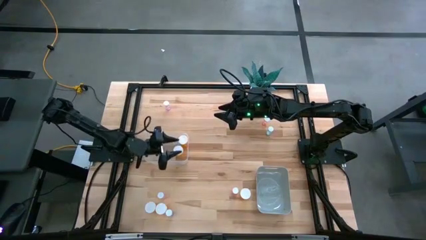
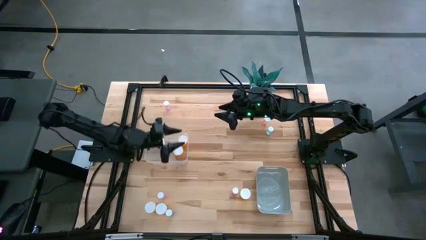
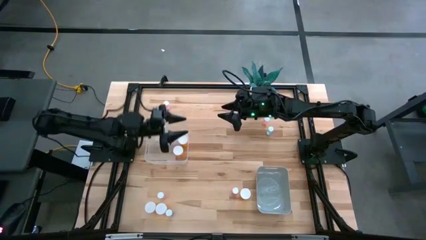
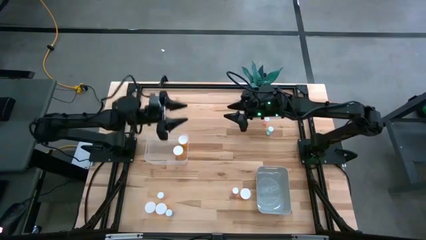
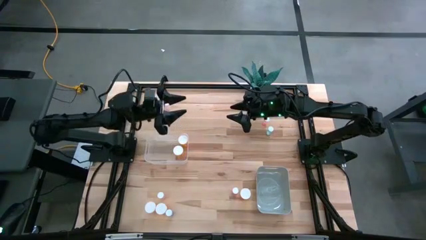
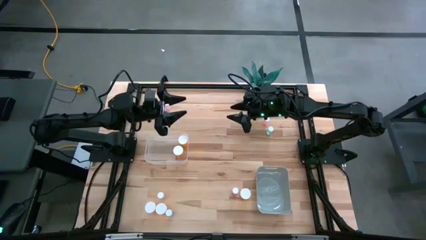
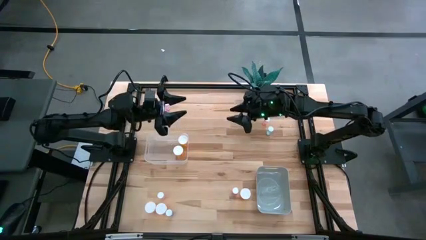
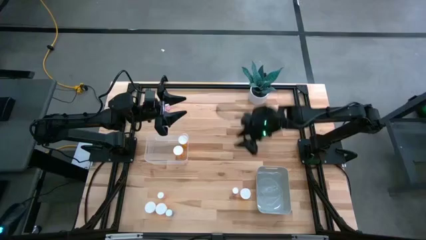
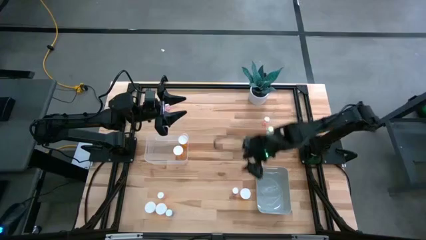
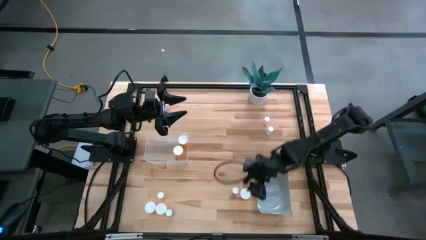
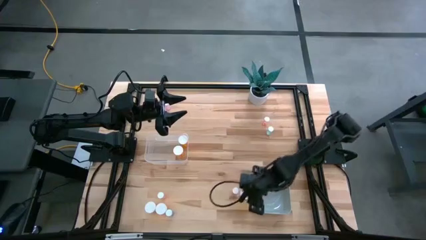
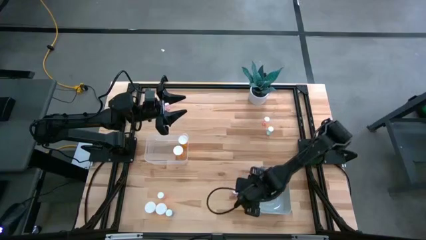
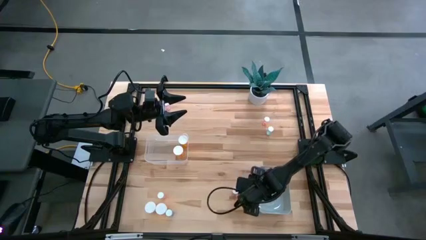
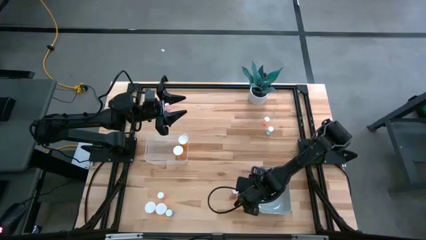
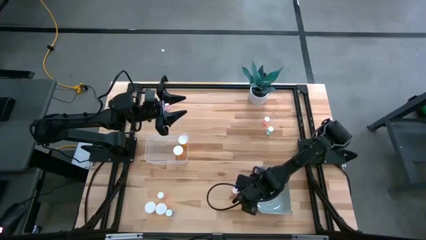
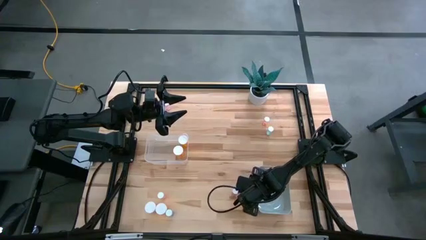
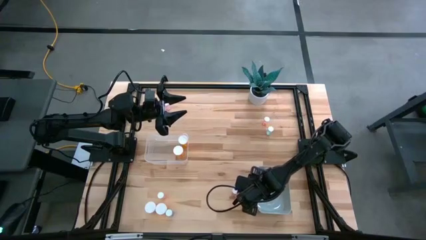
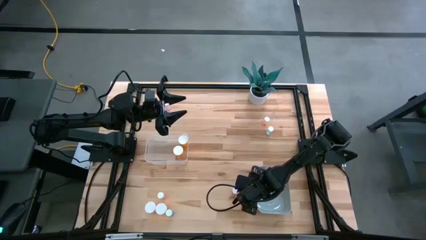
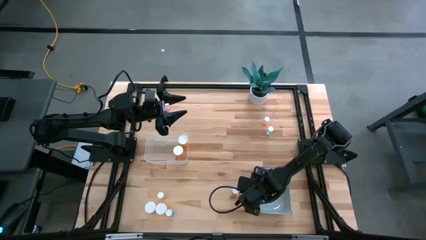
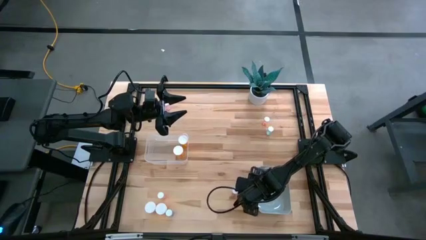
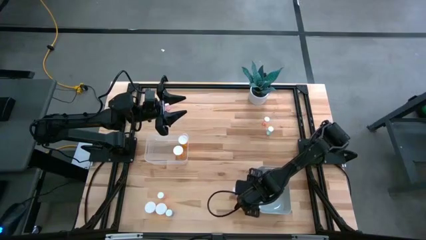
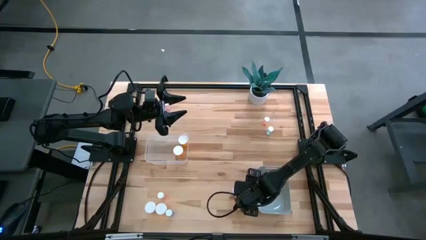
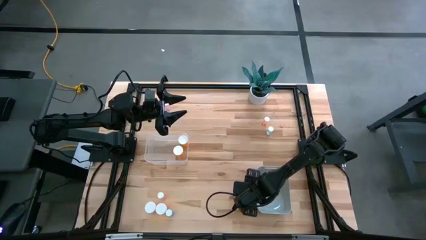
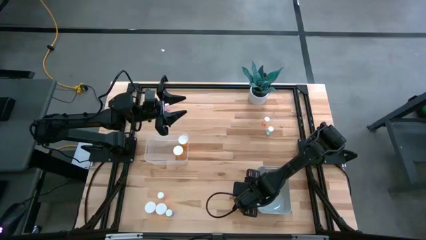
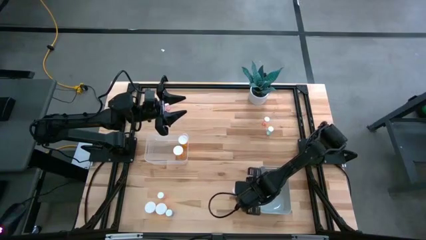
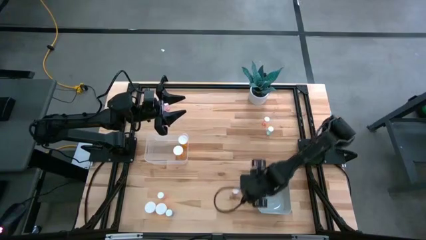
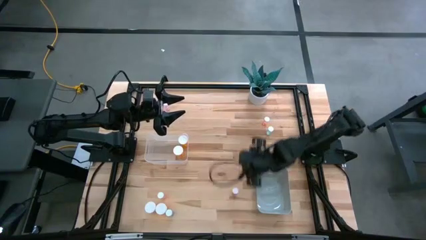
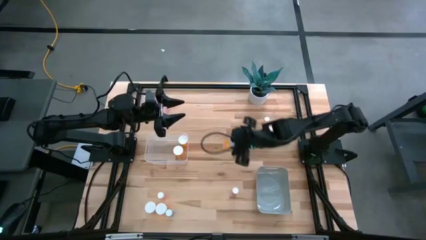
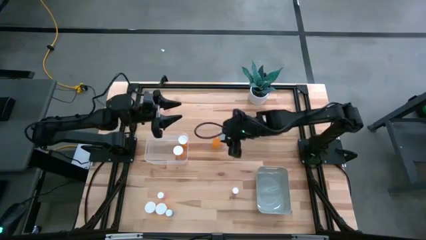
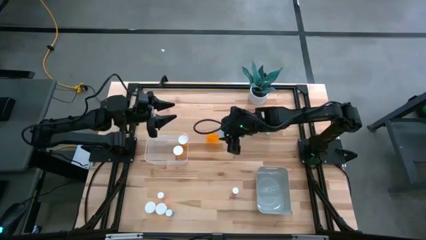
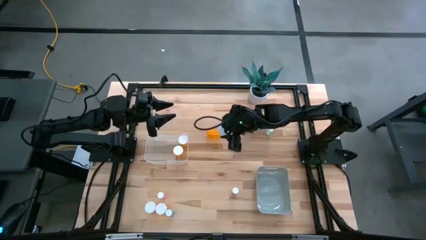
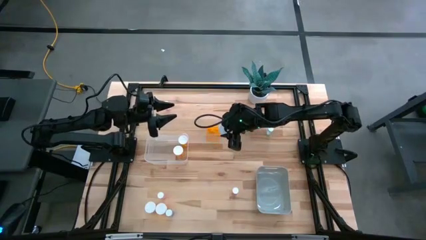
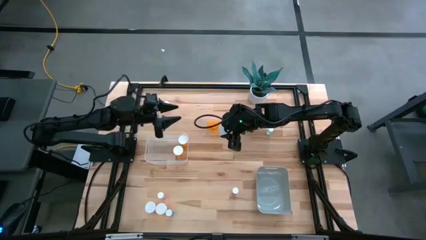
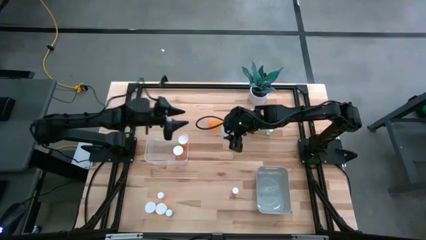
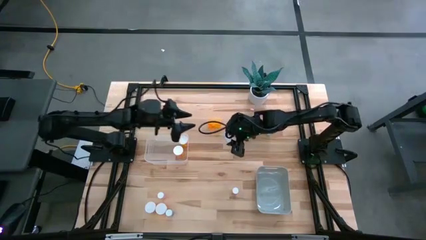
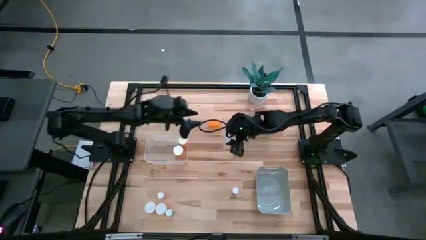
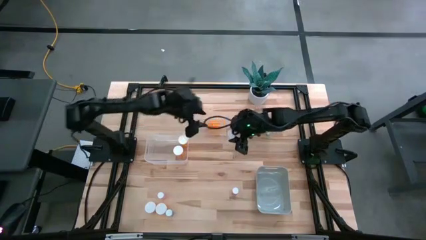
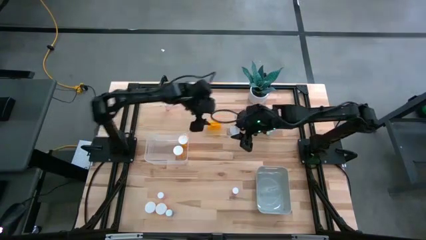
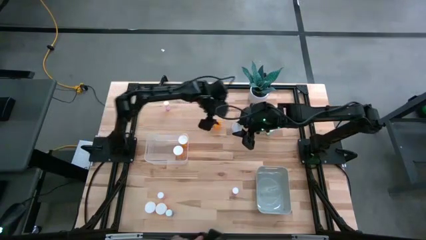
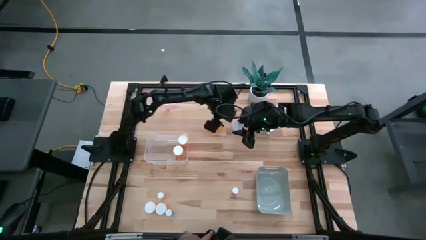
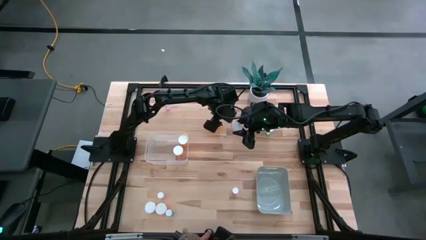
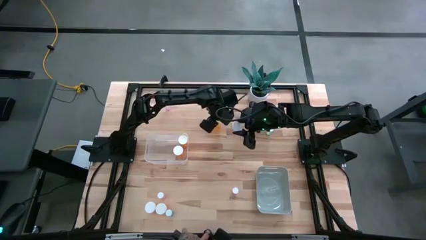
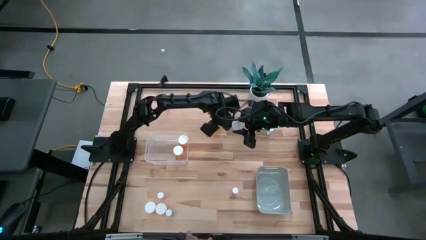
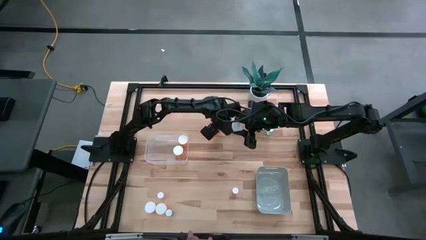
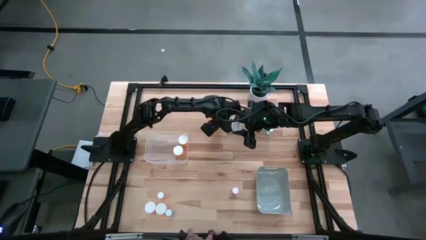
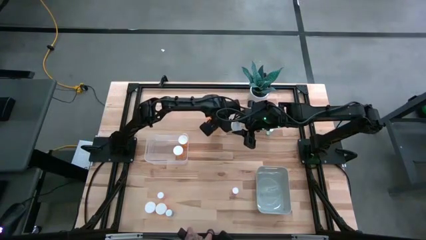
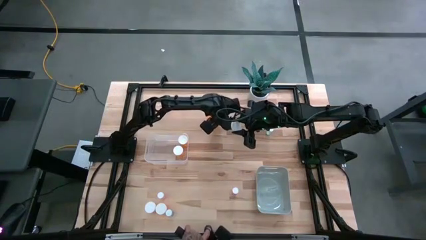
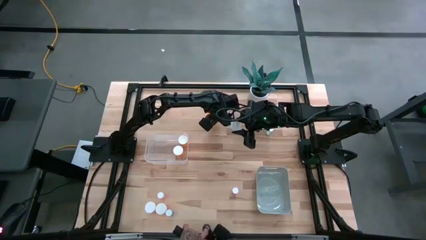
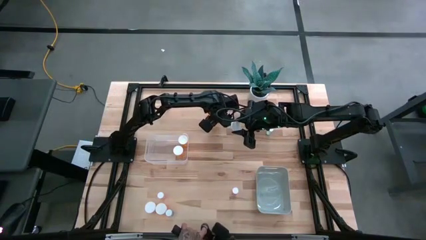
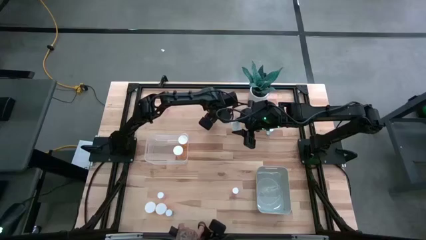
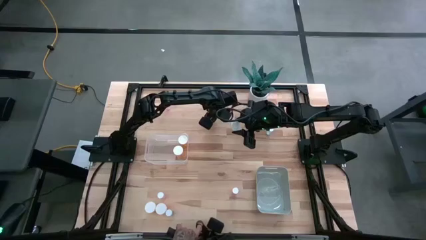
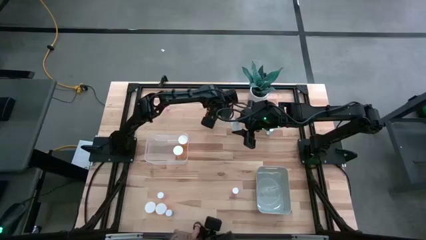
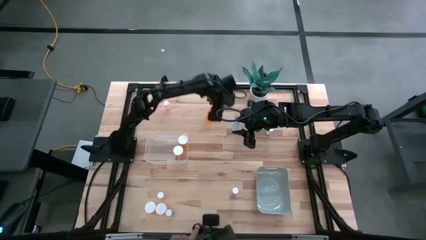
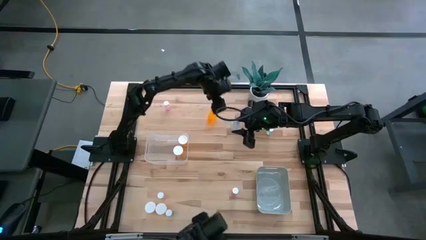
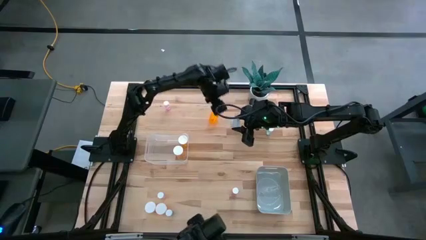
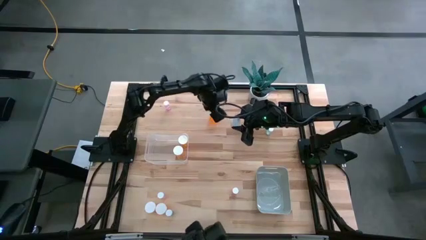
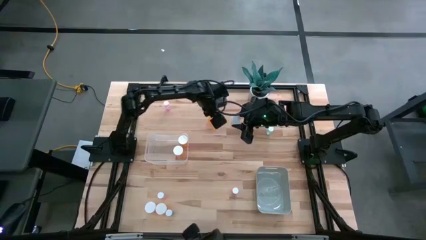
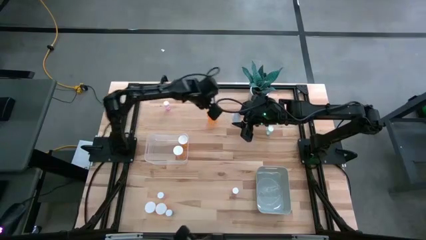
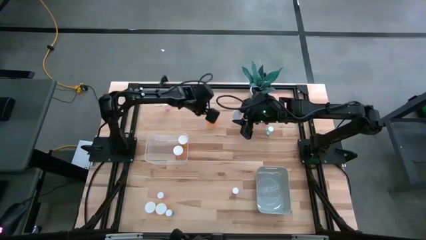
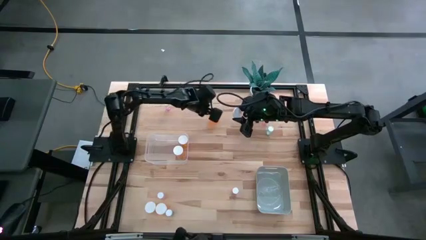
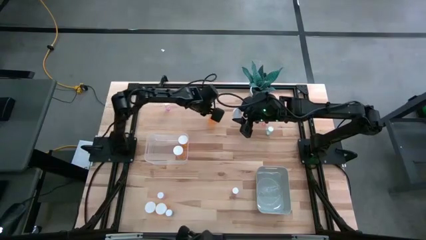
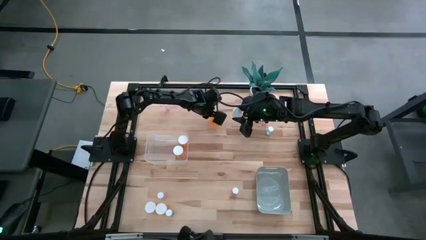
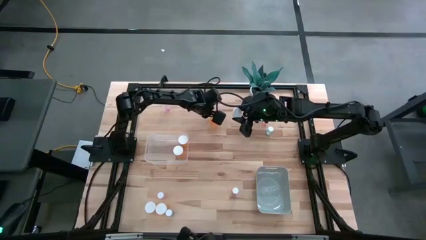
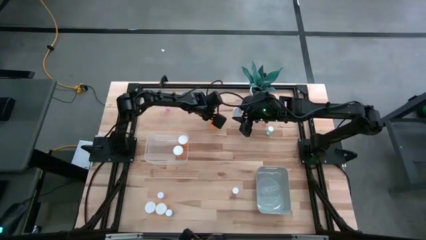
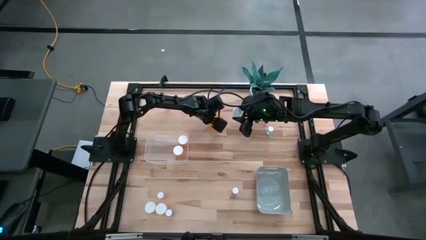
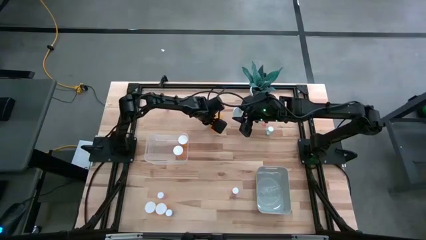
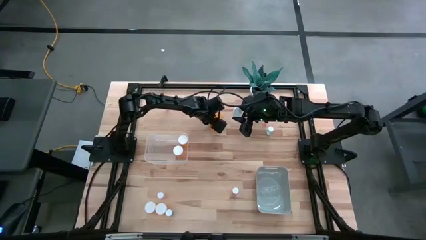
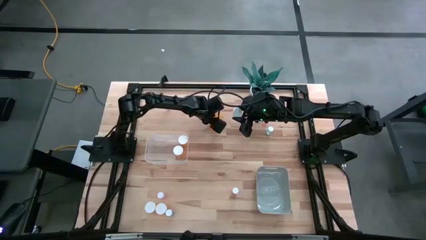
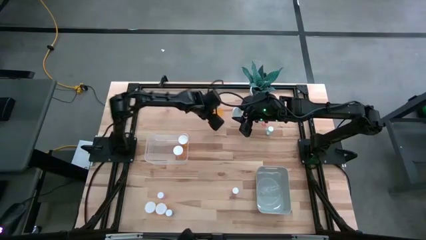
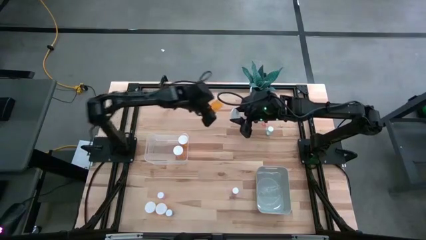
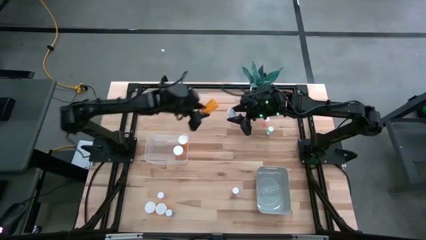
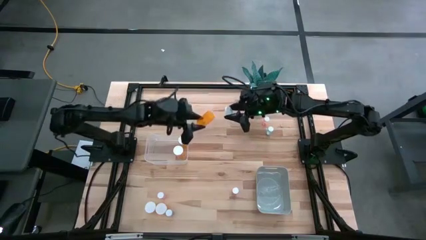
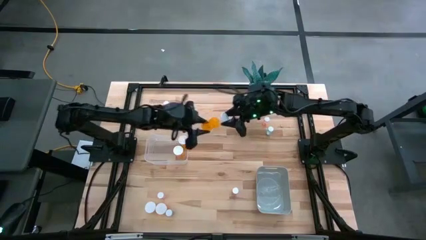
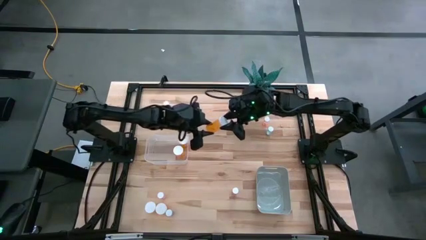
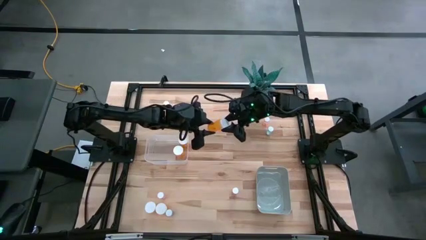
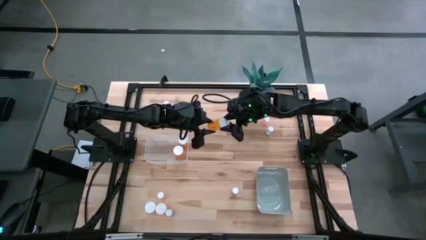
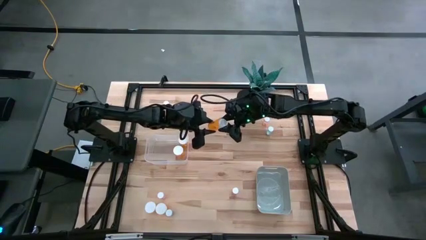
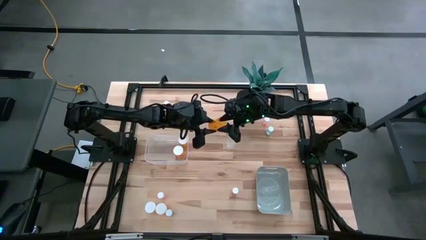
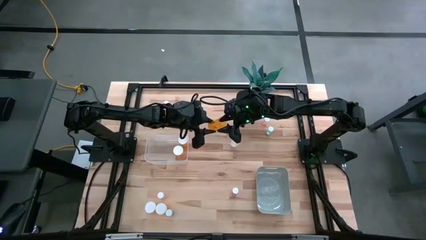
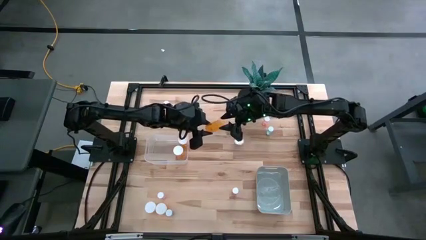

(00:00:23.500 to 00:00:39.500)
Task: Pick and place medicine bottles into bin by pill shape (circle, oval)
Put the large orange pill bottle into the transparent bin
